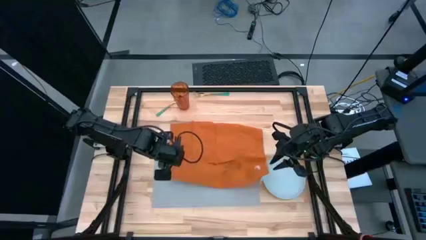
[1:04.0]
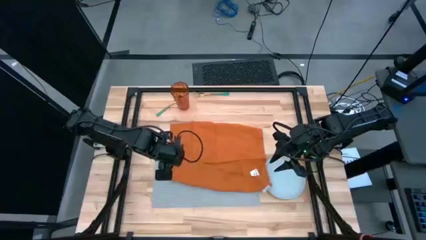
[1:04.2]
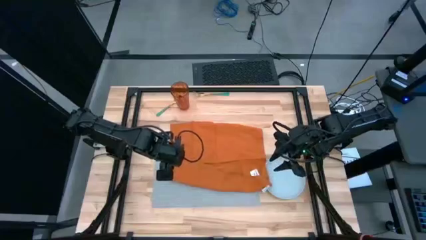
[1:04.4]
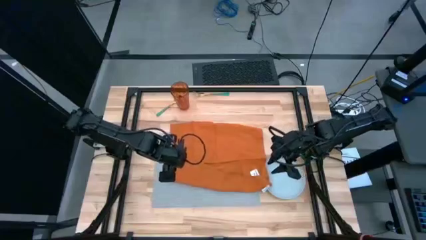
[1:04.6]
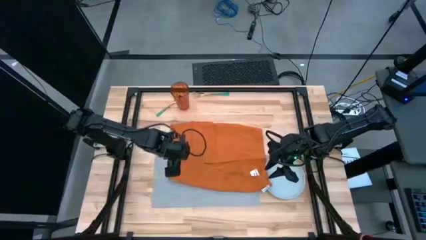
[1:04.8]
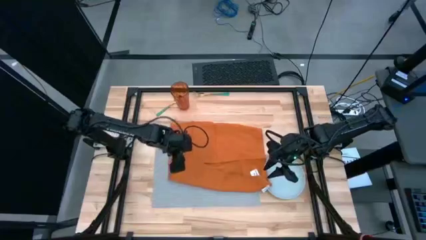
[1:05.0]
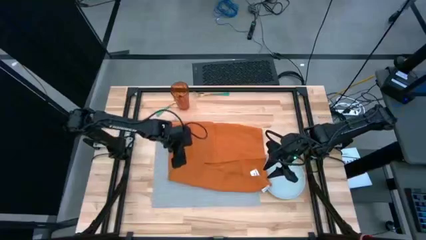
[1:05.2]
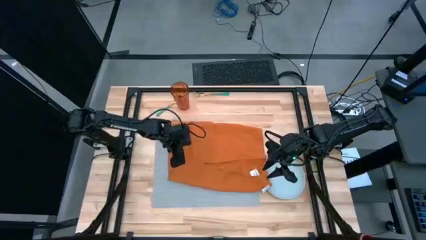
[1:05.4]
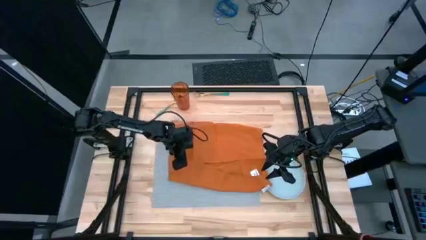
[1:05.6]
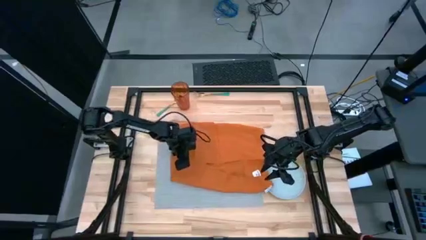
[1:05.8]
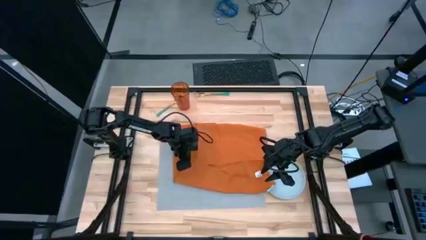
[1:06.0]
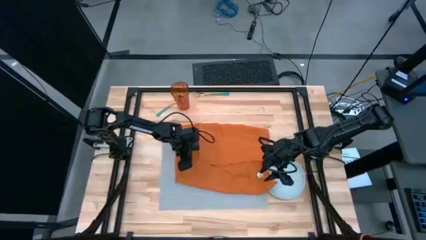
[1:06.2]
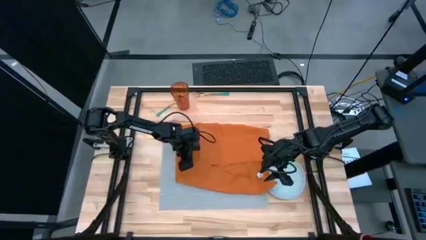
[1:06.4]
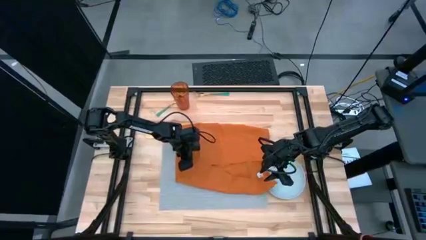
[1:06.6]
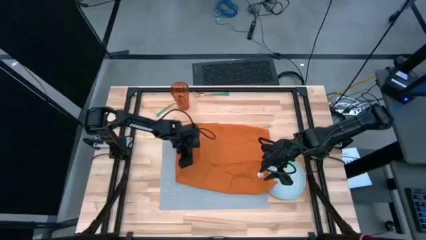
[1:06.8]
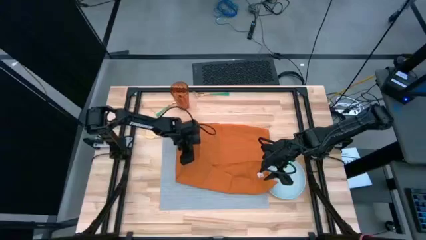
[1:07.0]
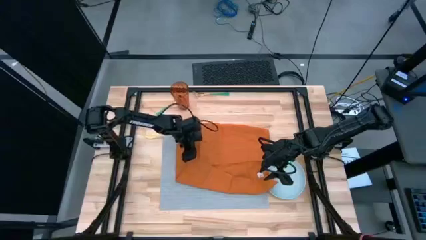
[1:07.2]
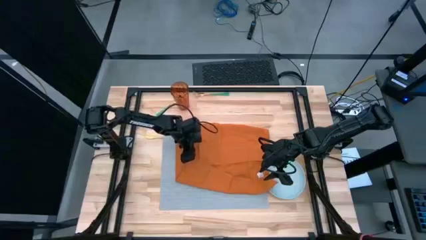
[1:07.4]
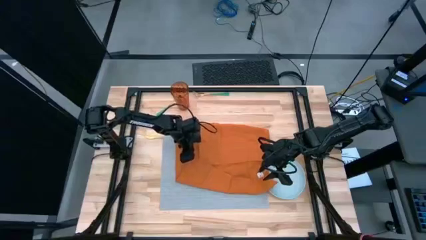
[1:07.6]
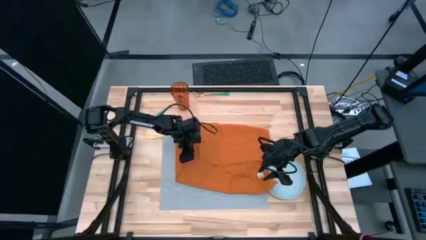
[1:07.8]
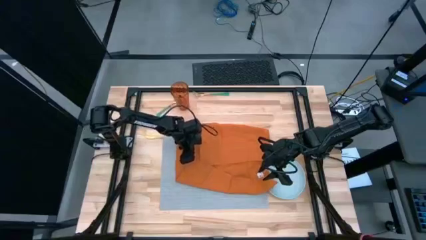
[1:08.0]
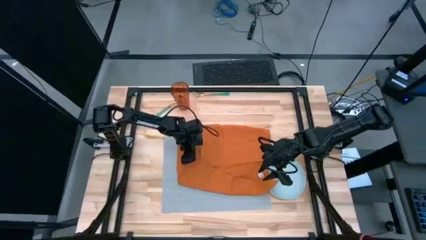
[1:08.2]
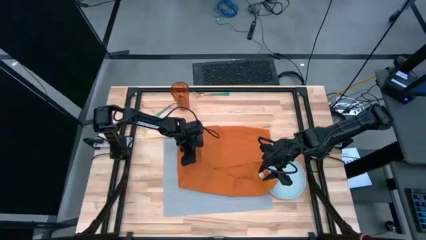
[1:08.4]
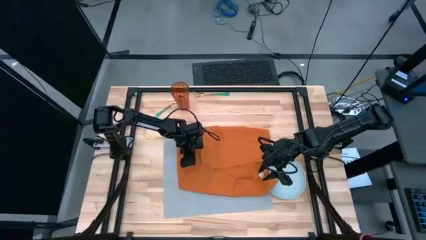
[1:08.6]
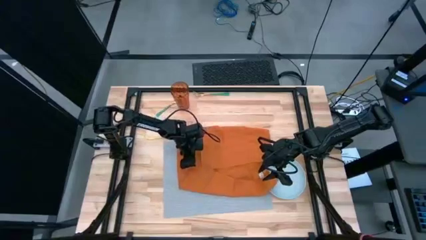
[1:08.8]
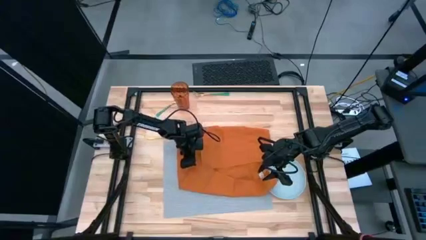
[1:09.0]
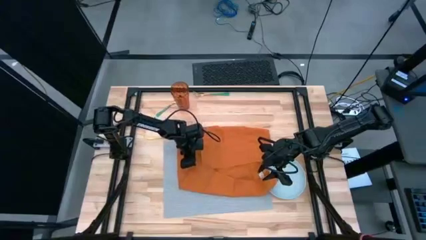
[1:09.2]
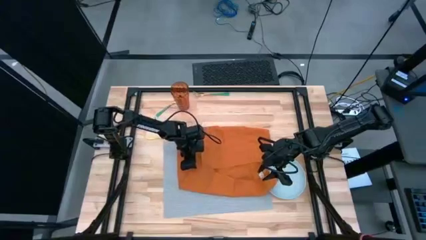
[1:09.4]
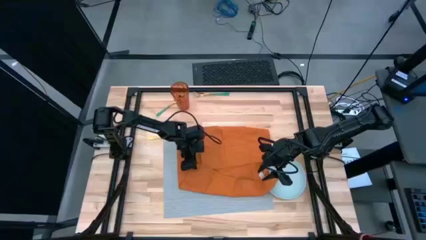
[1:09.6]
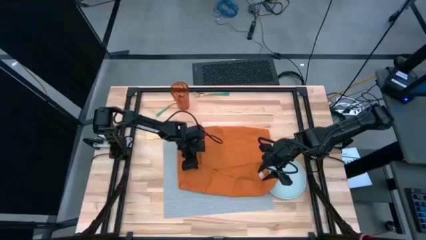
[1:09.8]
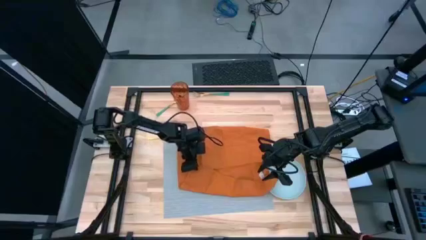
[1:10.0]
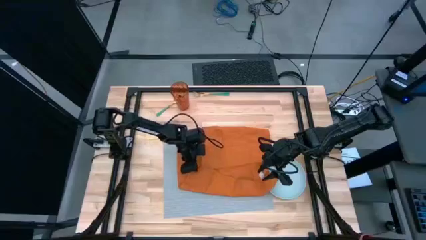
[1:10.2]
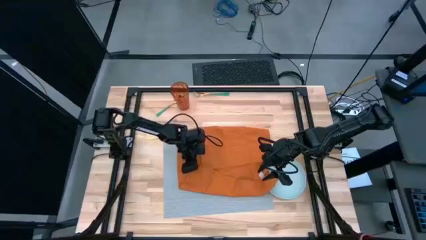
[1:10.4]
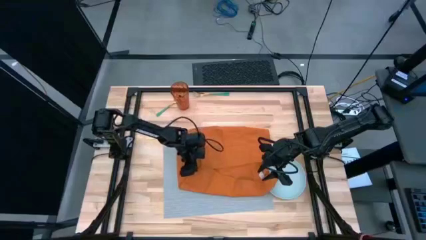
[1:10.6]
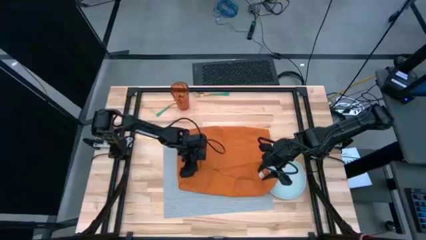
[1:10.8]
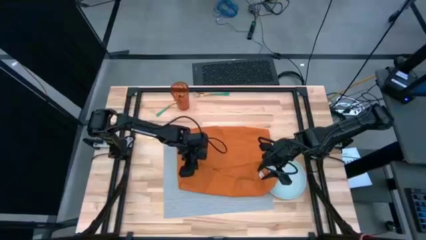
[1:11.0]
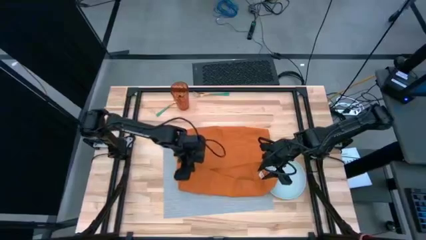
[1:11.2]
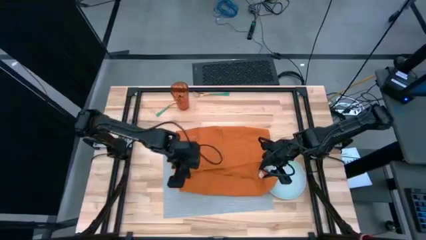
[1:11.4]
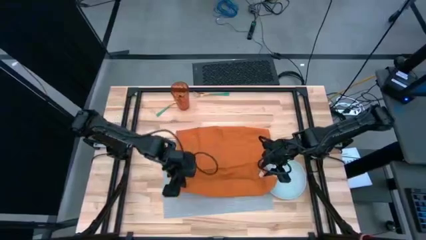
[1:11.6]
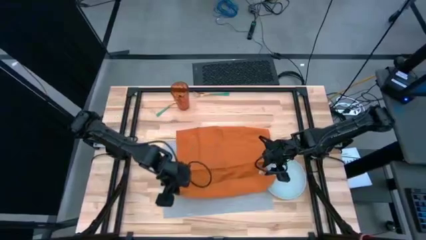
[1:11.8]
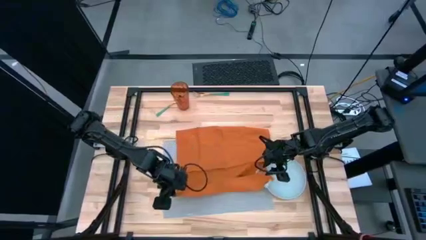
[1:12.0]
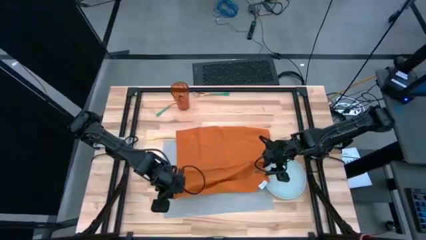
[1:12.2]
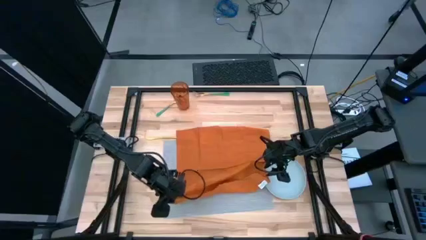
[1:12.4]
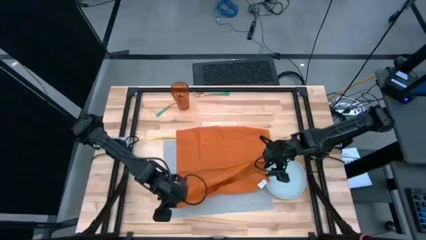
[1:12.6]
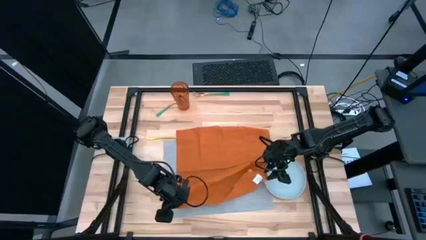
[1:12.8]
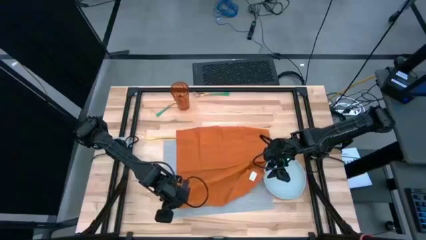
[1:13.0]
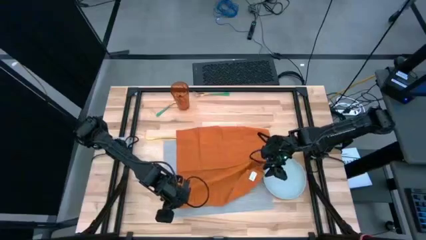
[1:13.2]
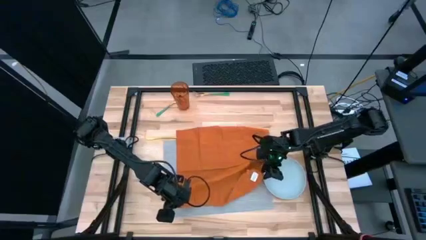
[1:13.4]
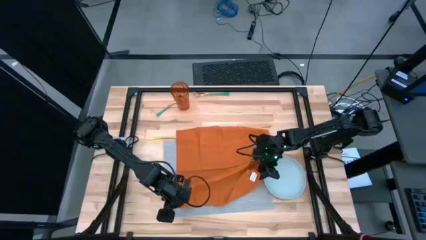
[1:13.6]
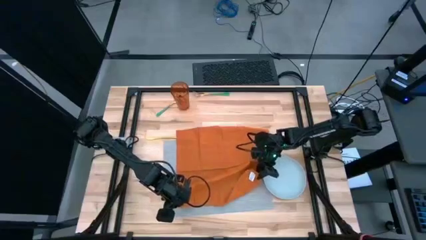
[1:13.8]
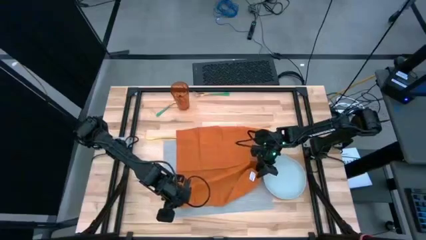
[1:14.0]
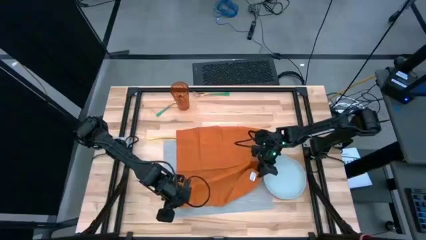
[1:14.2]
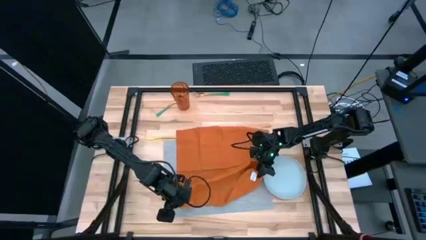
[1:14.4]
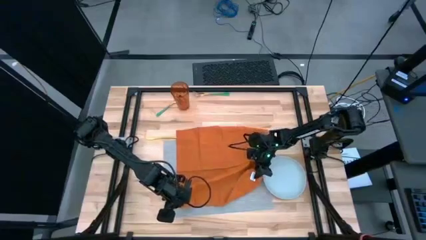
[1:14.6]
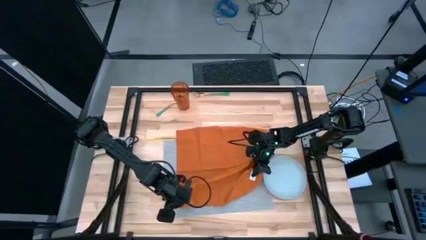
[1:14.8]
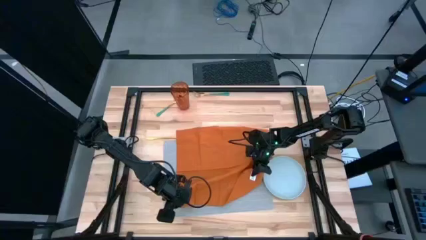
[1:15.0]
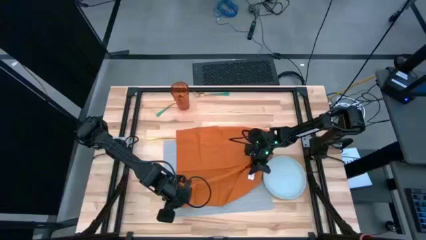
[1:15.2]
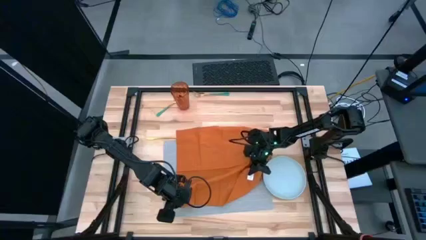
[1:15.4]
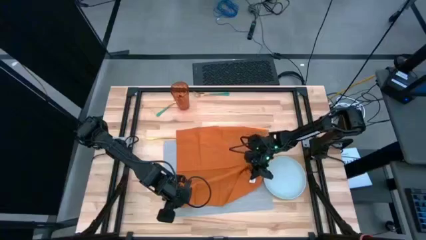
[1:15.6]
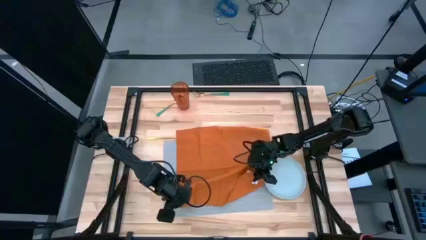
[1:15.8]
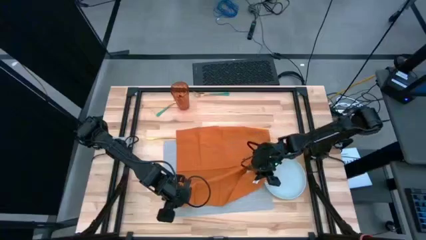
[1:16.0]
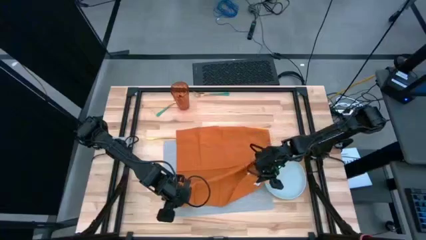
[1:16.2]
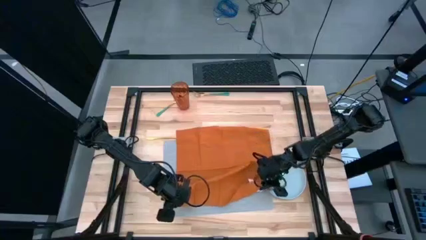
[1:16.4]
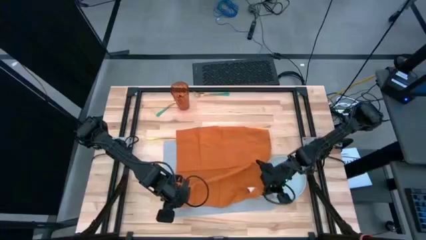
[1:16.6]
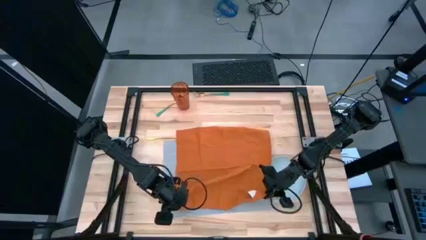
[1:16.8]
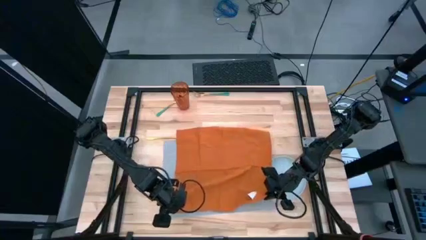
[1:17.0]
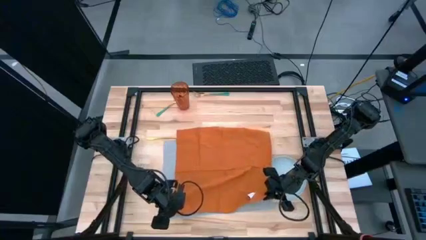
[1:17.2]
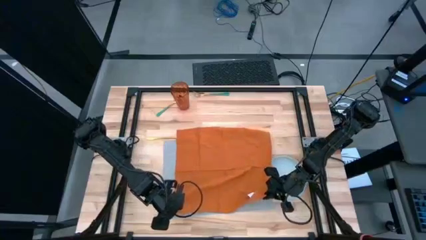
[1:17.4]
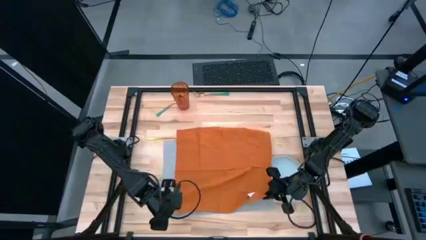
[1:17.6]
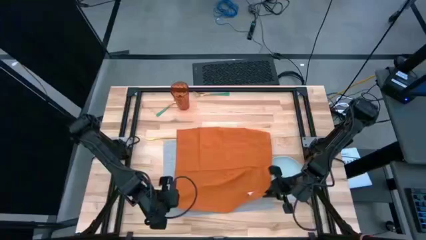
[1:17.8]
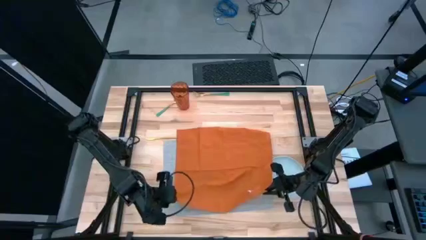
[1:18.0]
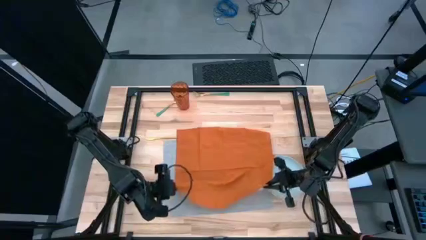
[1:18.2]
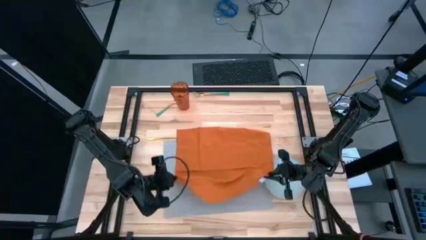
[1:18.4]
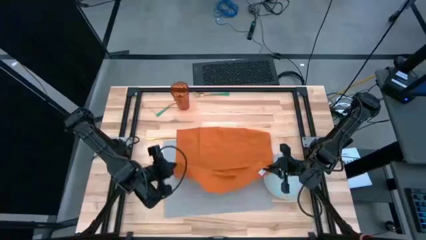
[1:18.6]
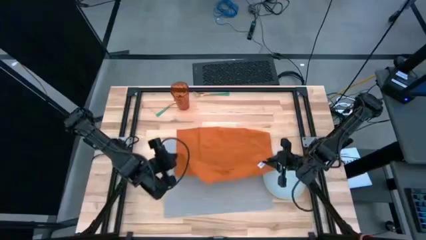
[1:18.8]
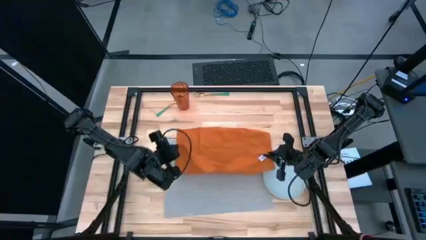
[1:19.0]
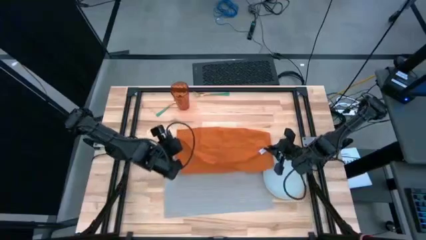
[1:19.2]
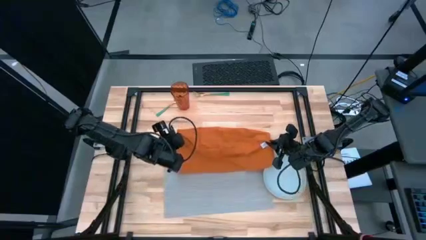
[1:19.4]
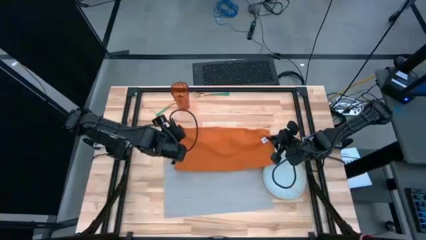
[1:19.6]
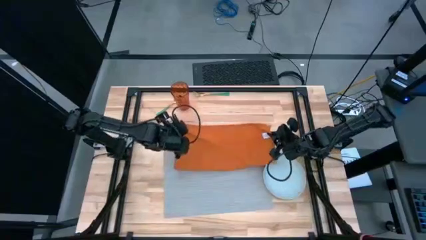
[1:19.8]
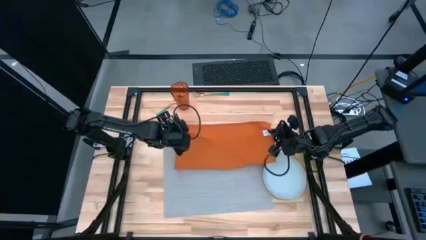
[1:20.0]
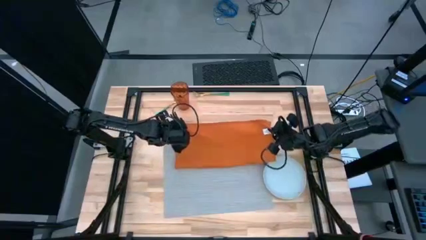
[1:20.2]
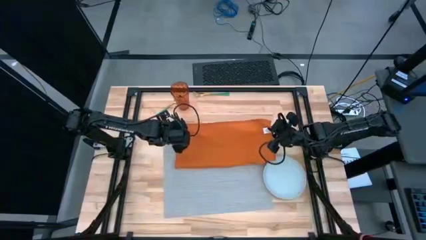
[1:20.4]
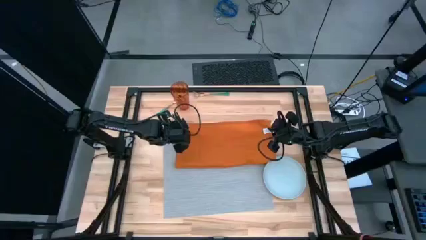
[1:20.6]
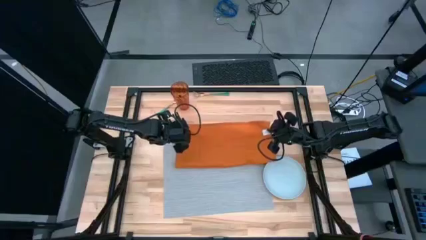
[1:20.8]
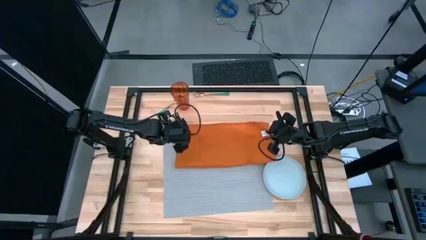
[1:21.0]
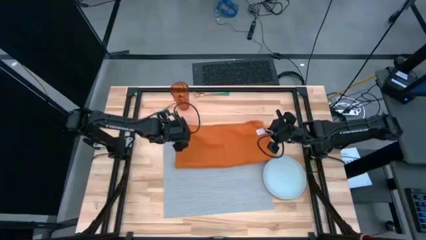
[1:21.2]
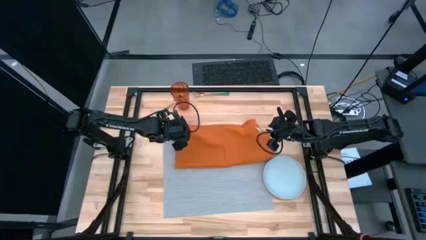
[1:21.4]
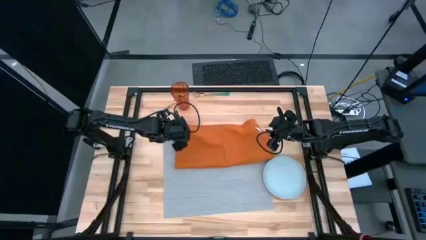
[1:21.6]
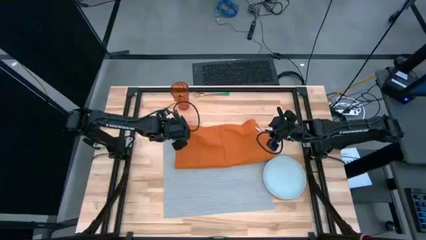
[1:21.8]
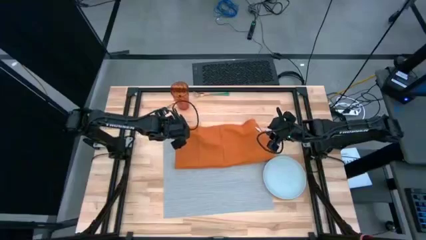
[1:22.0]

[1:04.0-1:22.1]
Task: Set table place
Fold the orange table napkin
